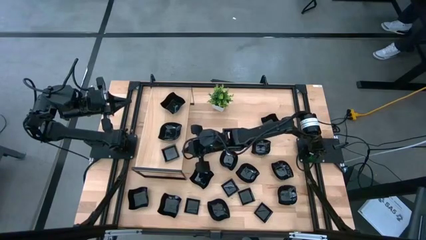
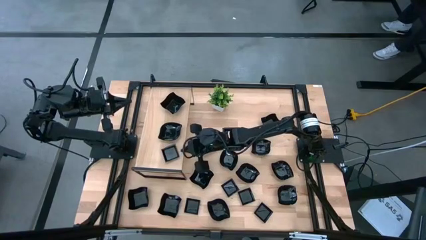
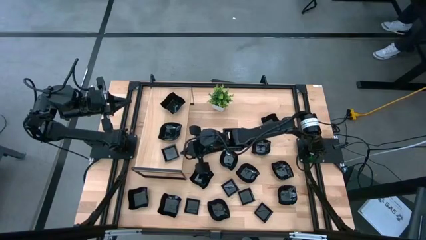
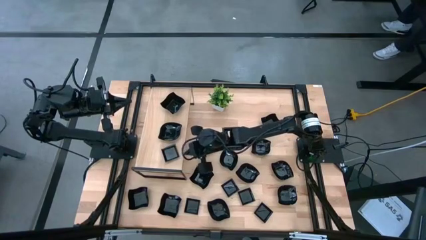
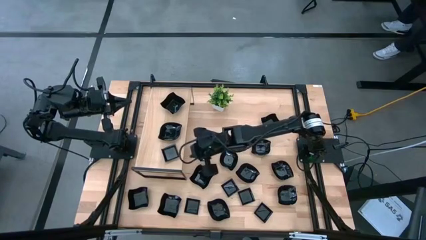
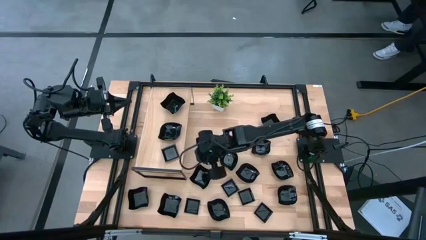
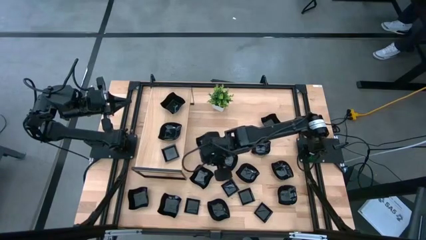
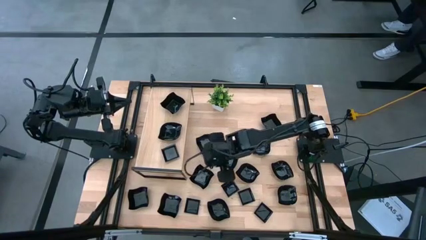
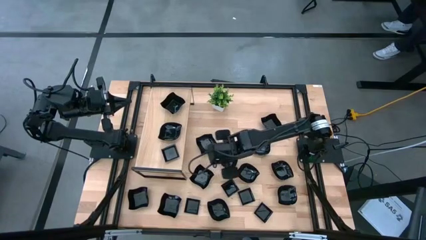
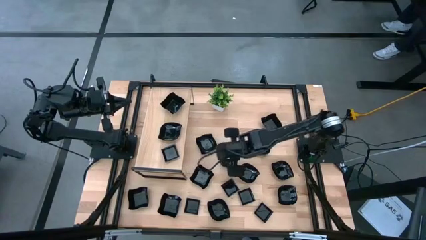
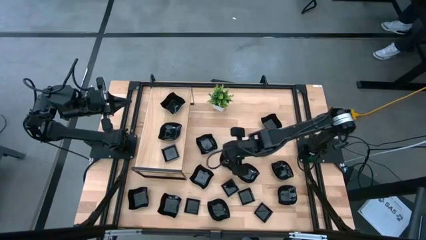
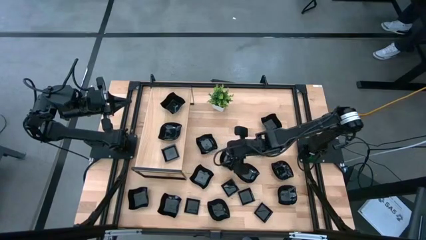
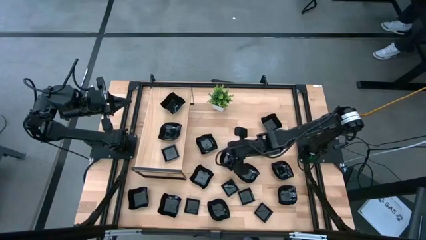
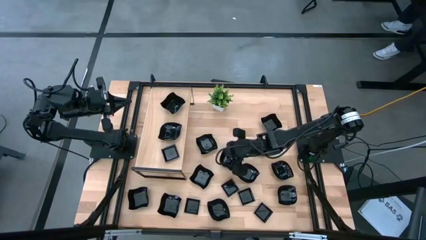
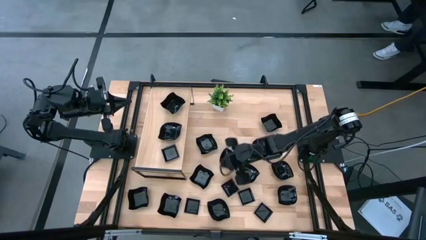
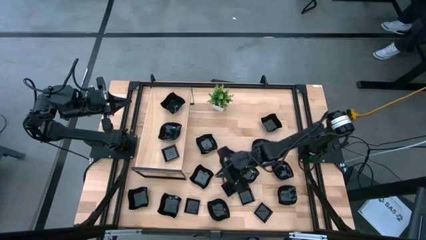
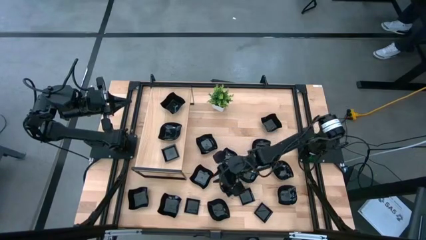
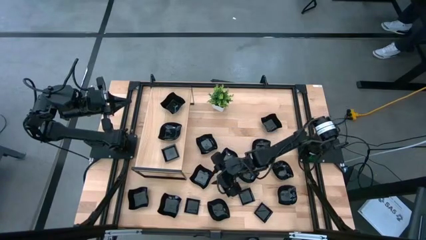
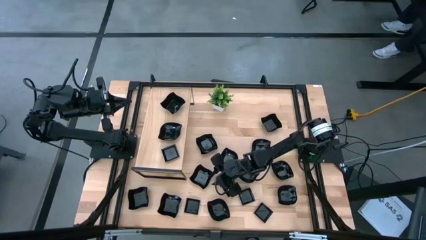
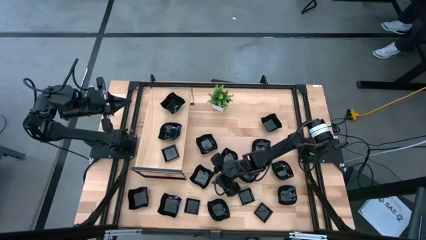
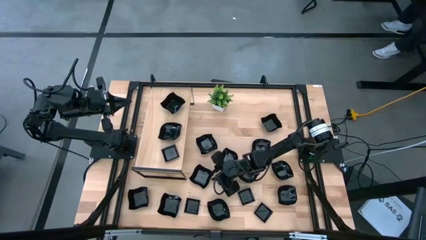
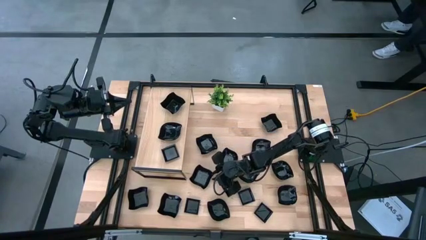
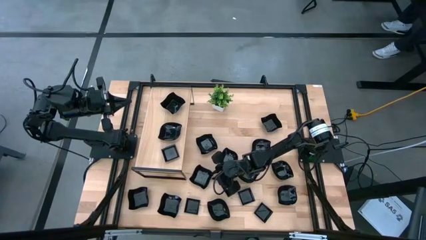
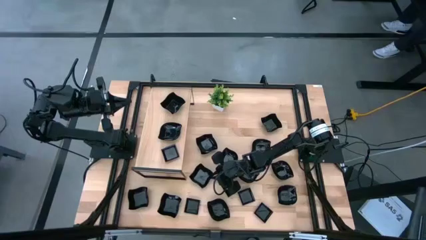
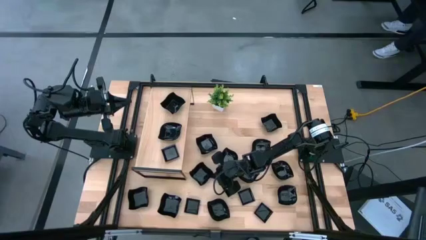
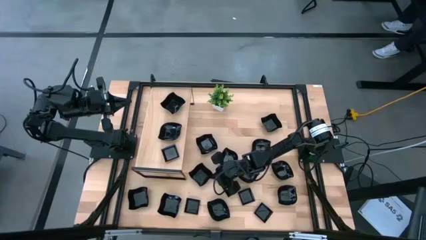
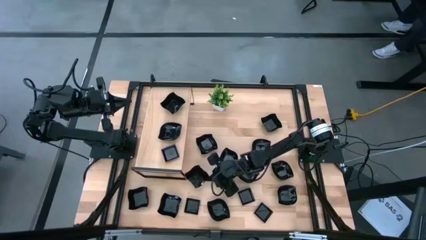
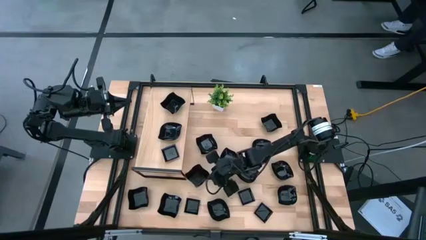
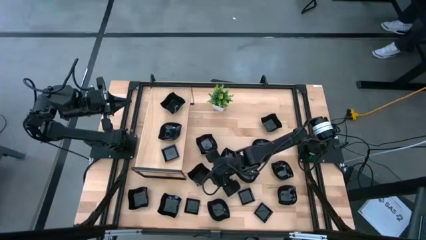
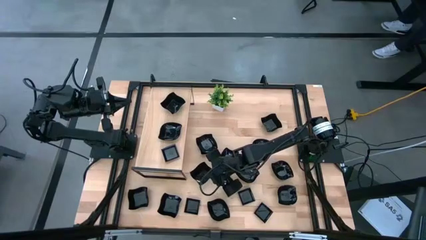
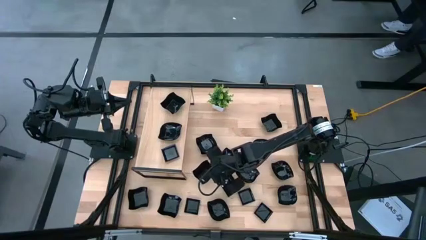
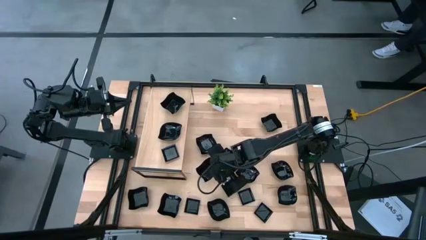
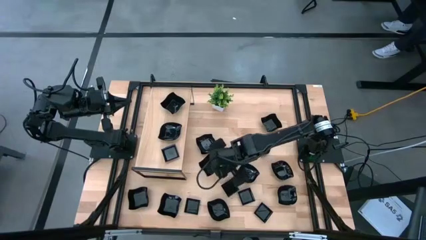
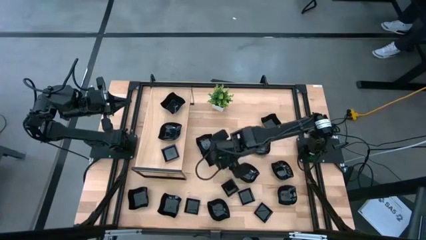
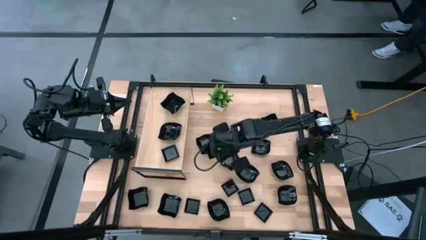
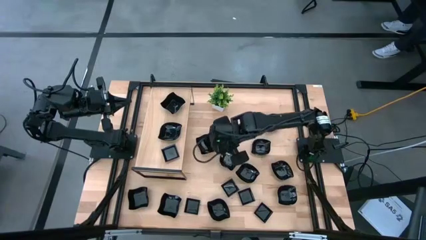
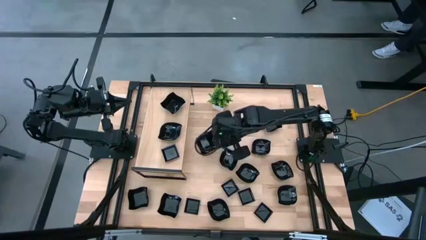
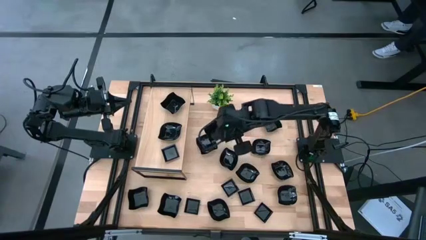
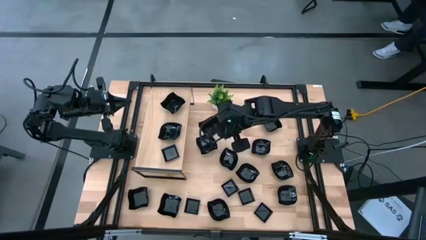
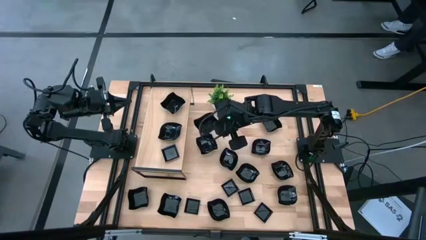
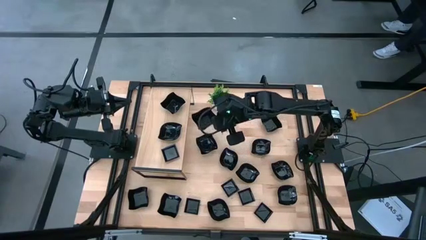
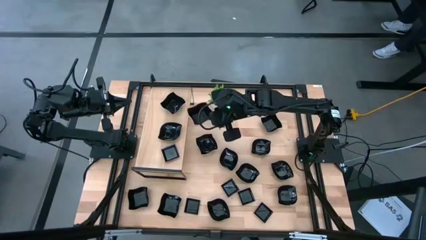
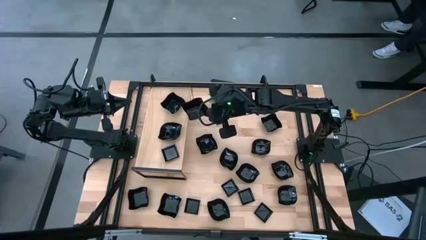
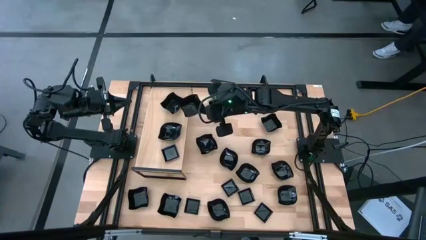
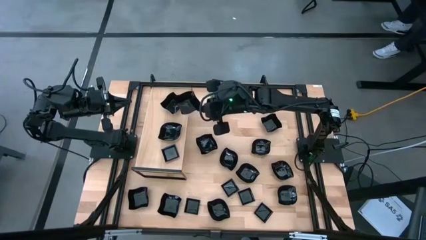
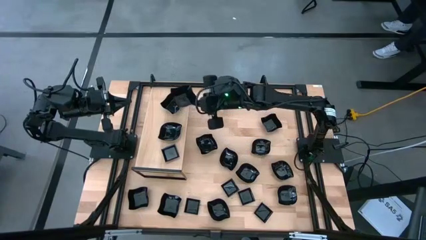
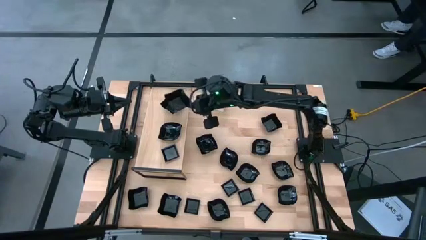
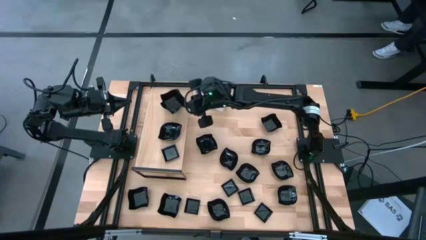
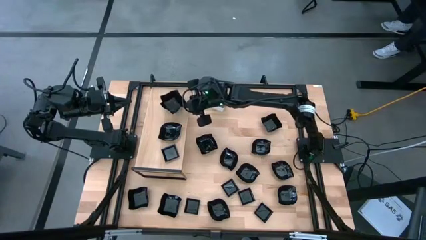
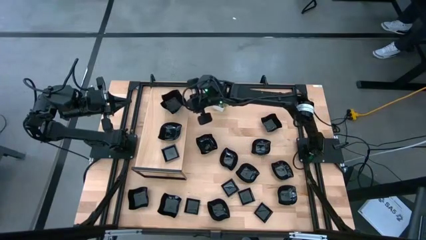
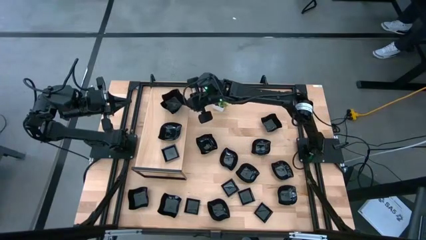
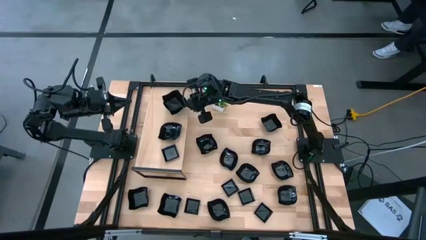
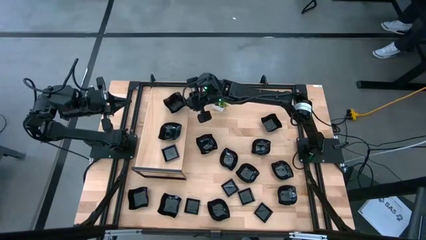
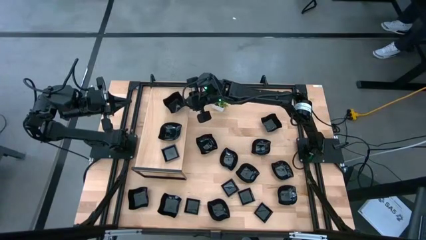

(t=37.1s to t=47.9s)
Task: Pick & Place Mini shaped plates
Stack the black distorted square plate on top of the black distorted square plate on the shelf

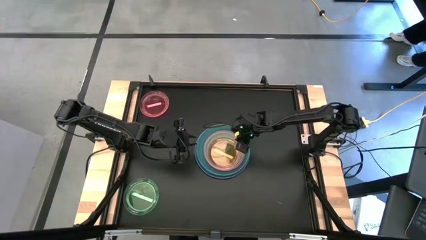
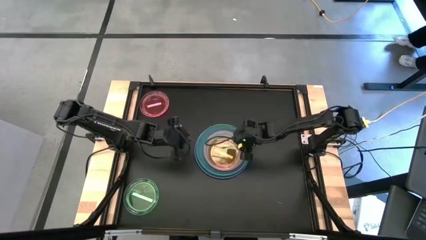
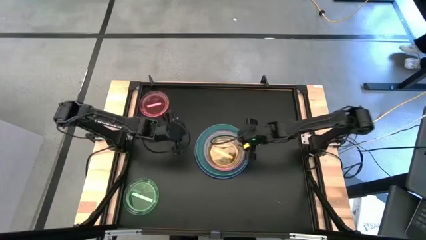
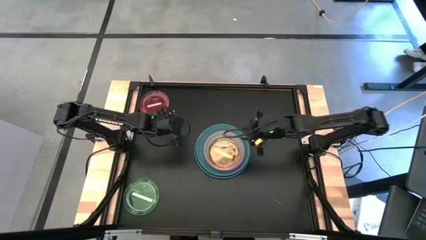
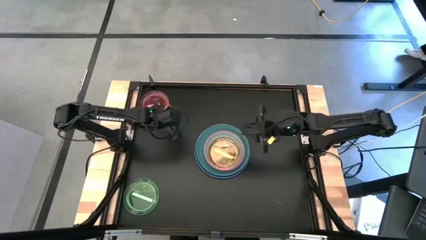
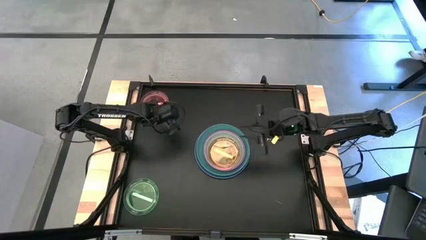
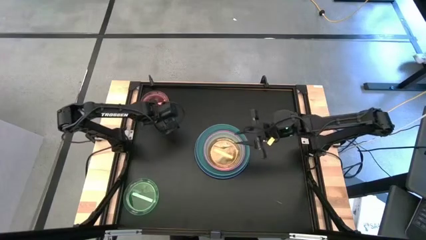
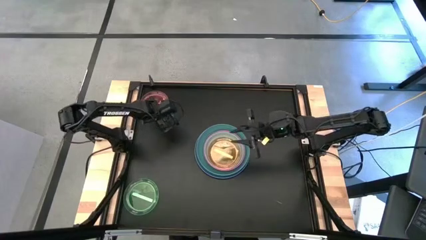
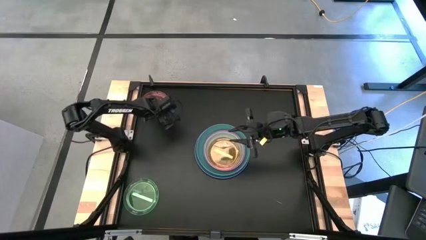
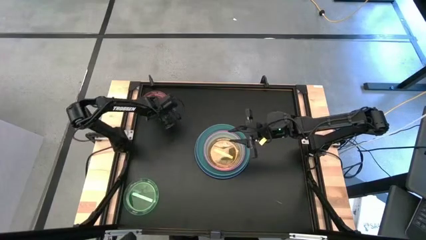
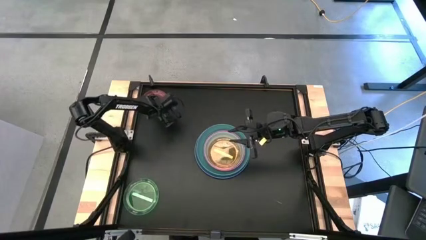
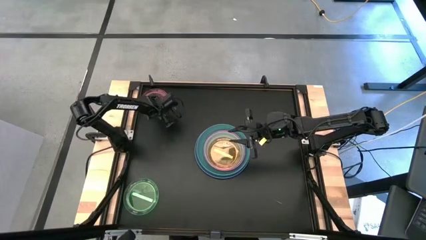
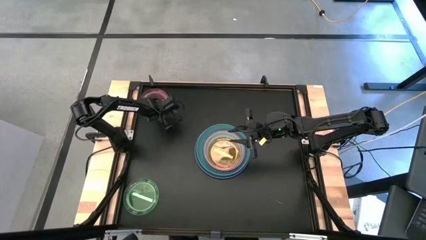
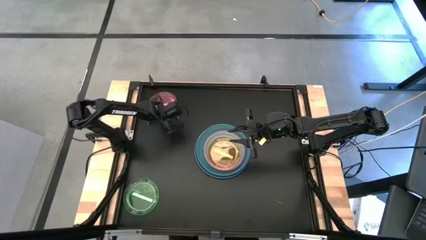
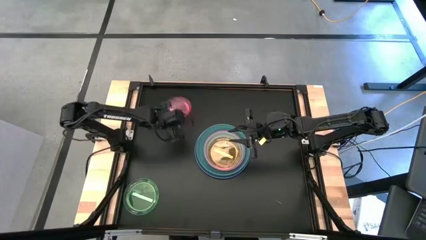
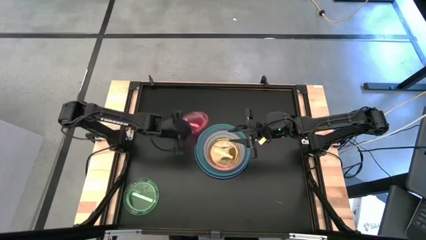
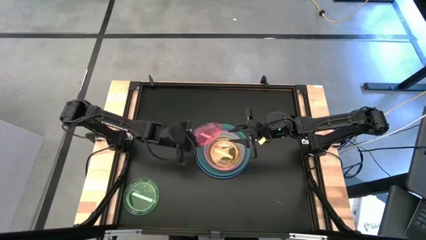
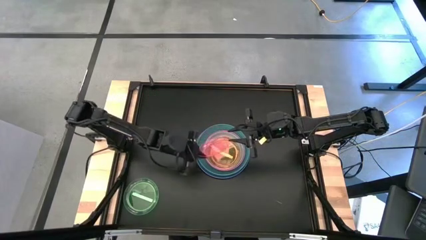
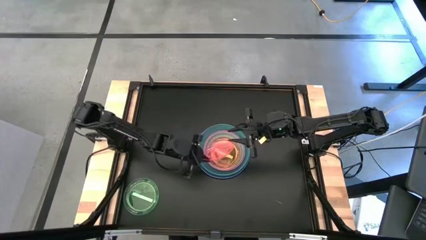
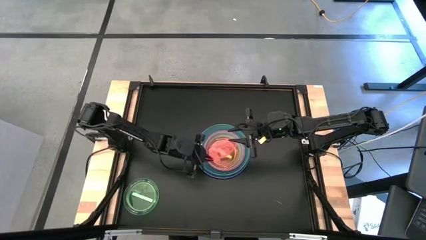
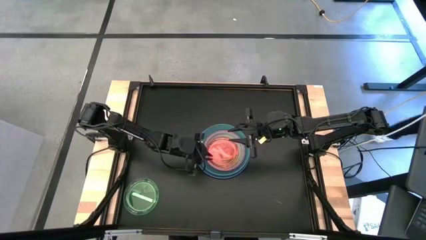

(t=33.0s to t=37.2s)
Task: Stack plastic plates
Stack the pink plate on top of the orange plate

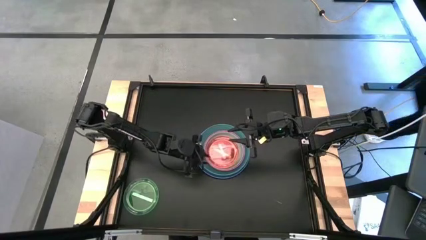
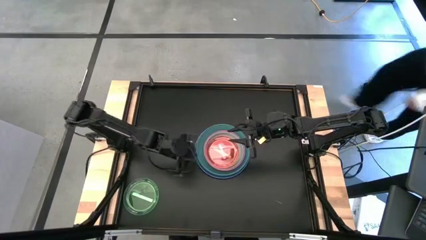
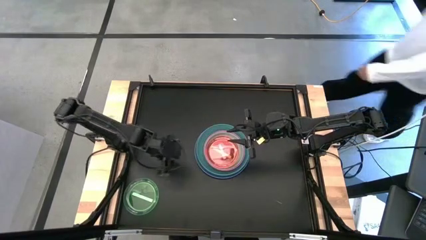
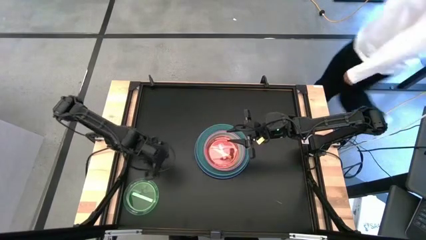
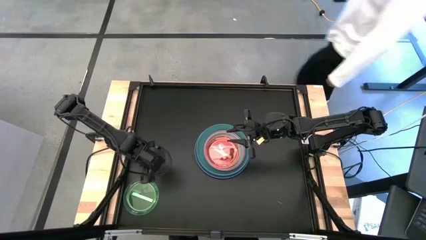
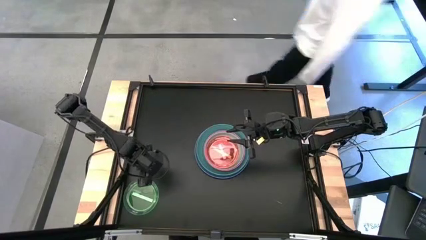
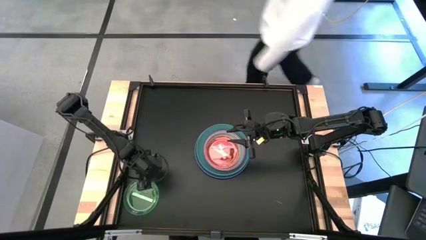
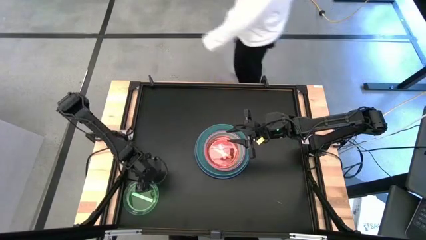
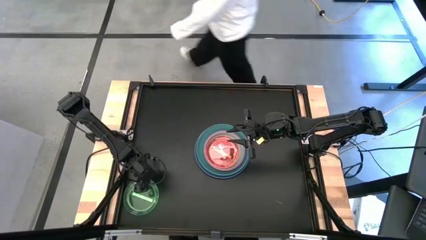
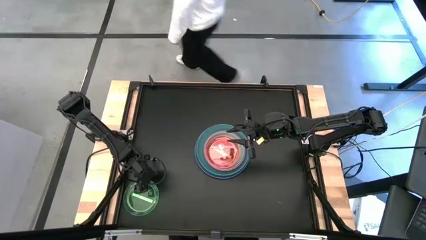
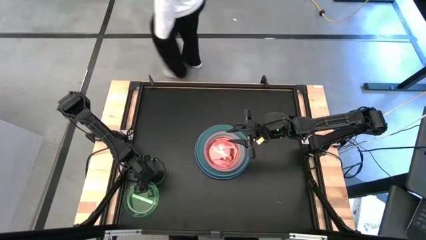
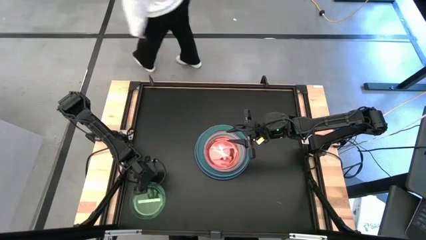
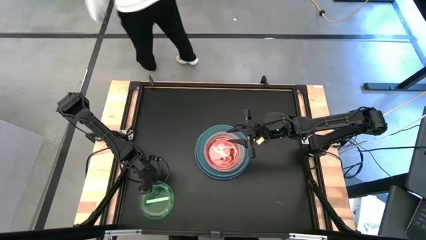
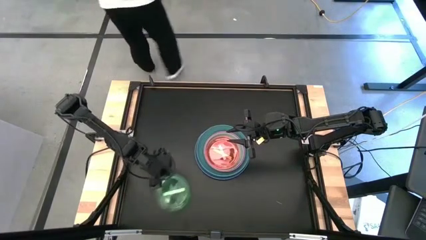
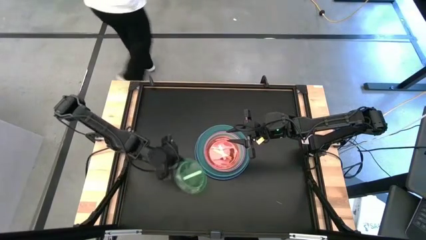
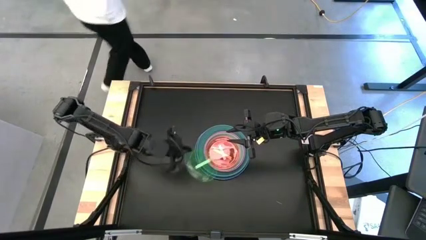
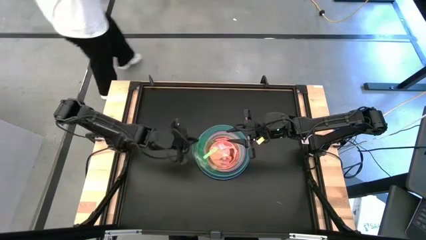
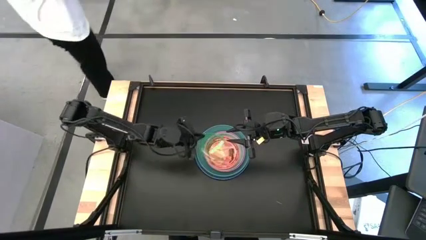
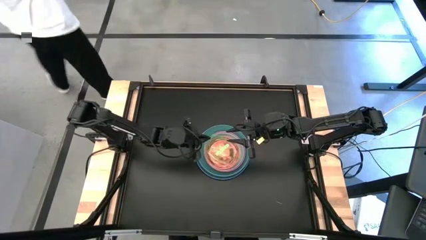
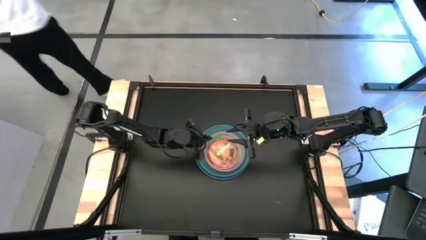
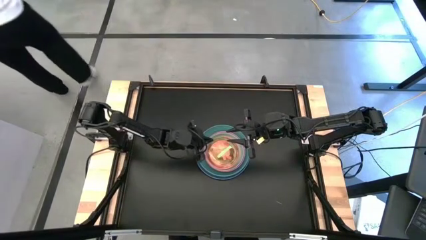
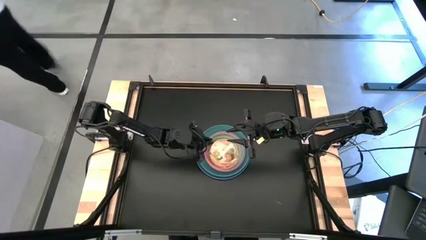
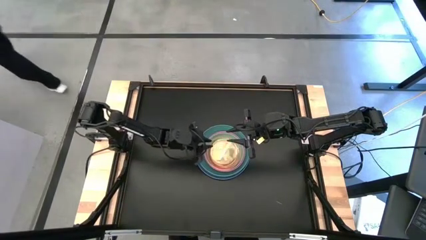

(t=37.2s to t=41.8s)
Stack the green plate on top of the pink plate
